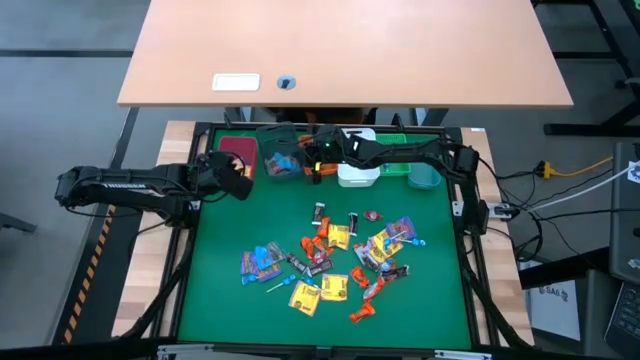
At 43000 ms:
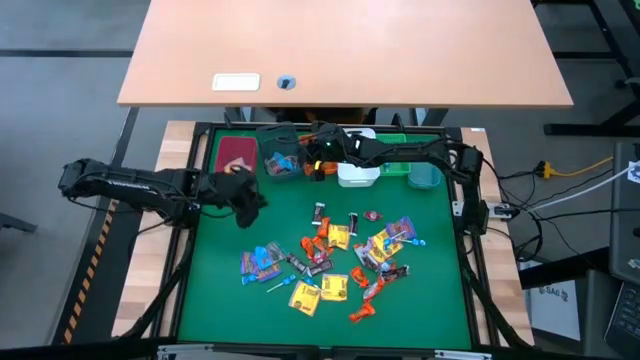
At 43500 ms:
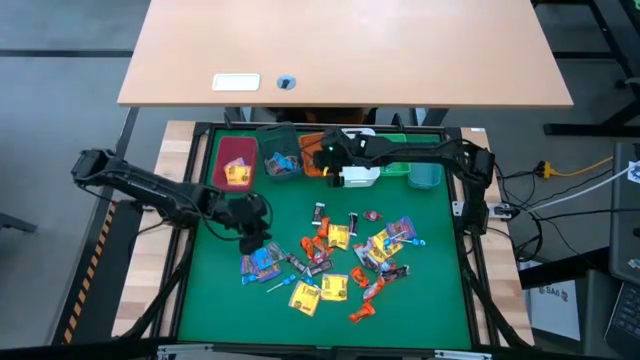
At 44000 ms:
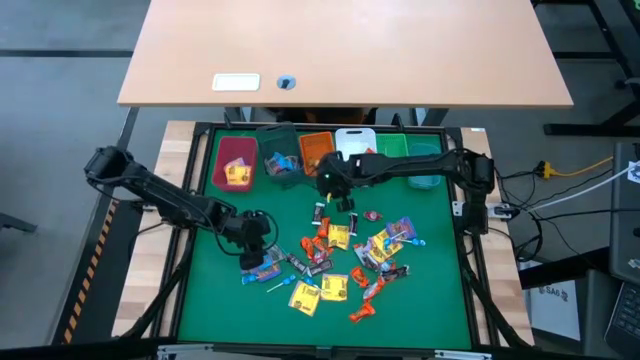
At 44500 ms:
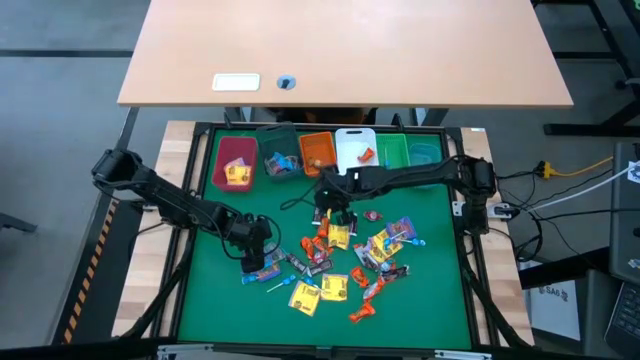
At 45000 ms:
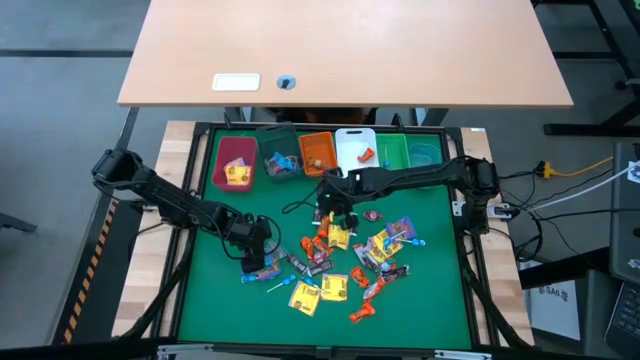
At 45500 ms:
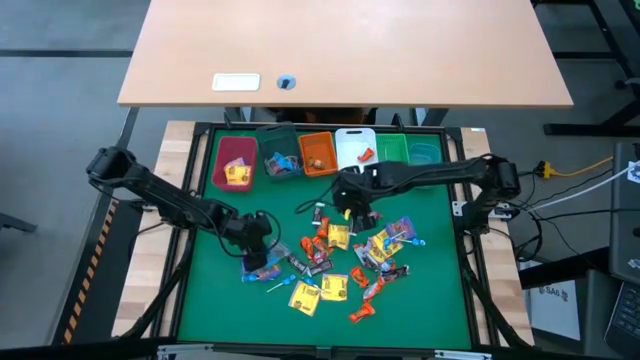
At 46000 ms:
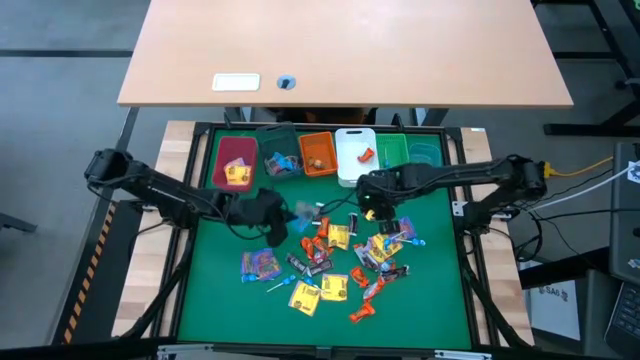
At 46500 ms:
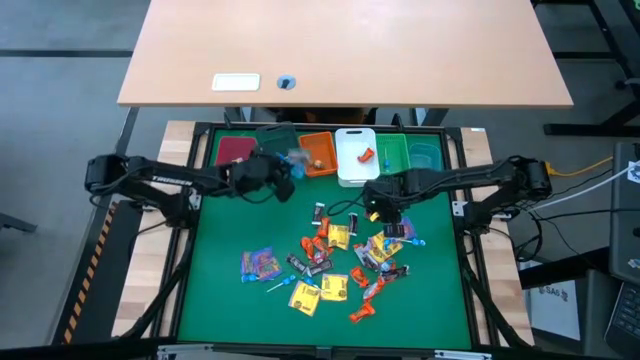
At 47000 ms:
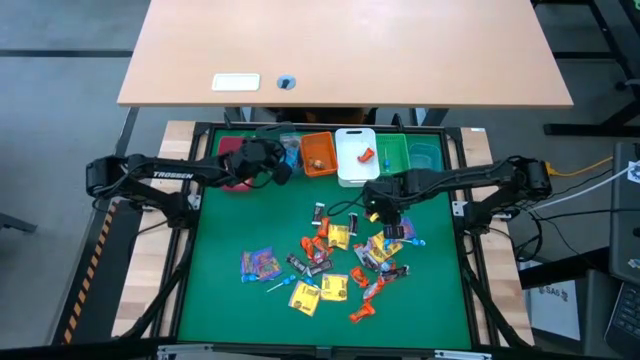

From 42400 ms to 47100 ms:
Task: Sort candy
Put the blue candy into the black bin

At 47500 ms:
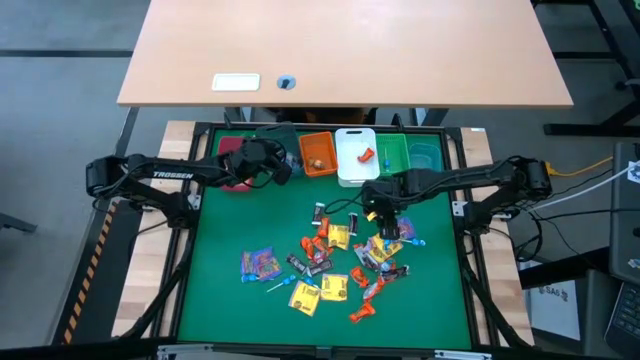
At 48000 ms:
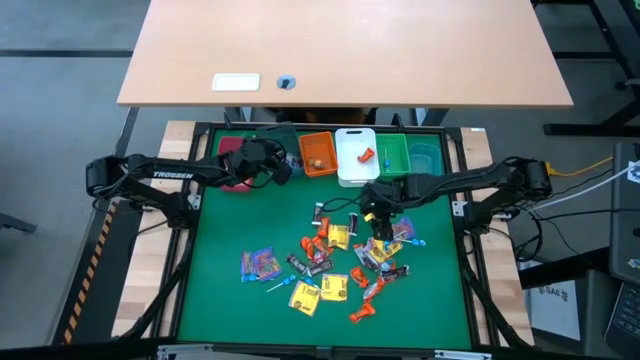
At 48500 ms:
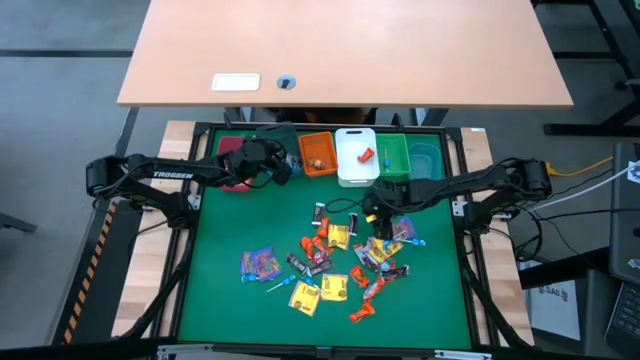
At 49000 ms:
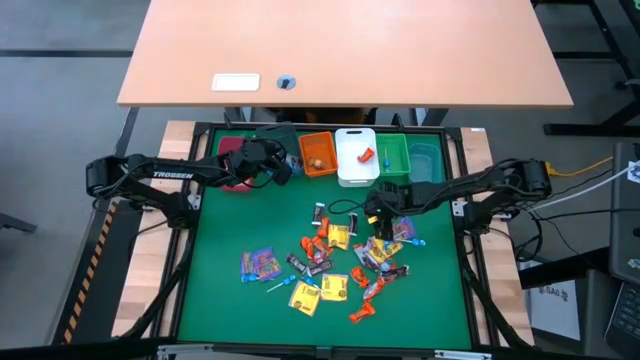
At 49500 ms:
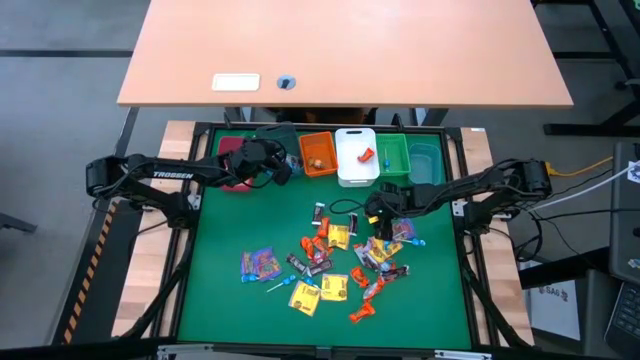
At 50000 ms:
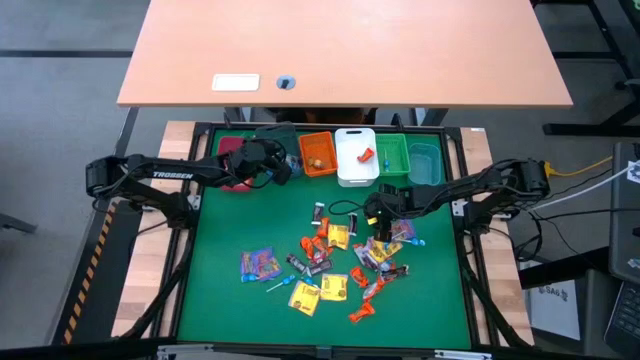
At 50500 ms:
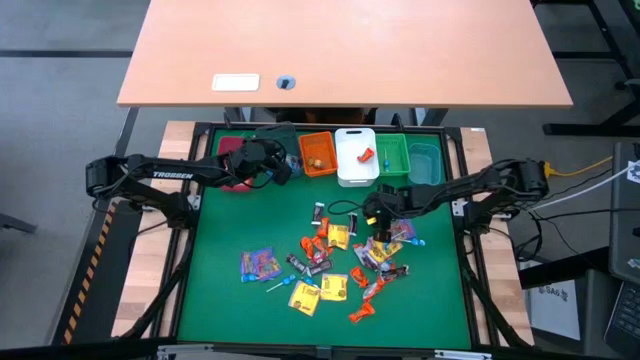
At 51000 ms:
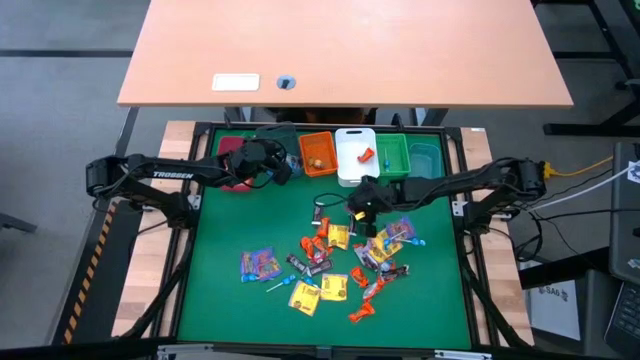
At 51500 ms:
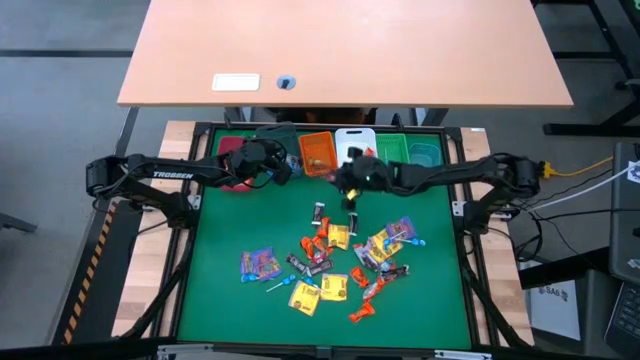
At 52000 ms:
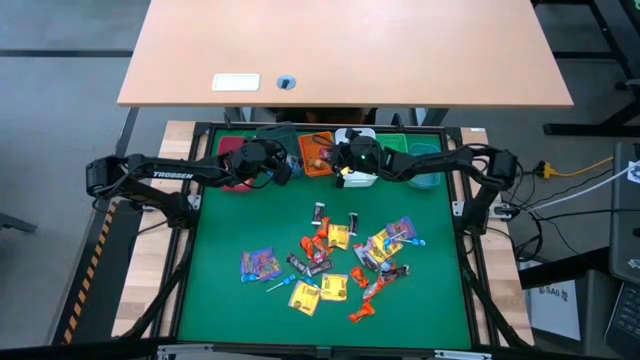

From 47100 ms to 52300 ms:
Put the red chocolate into the orange bin

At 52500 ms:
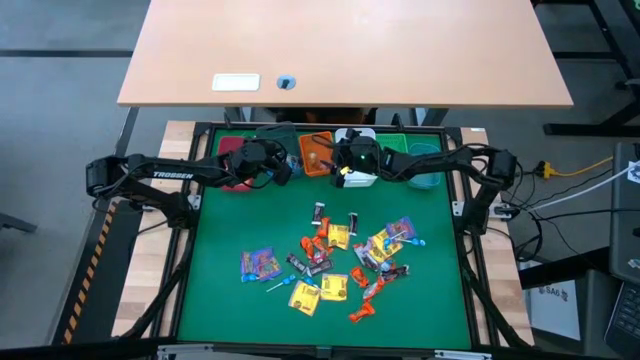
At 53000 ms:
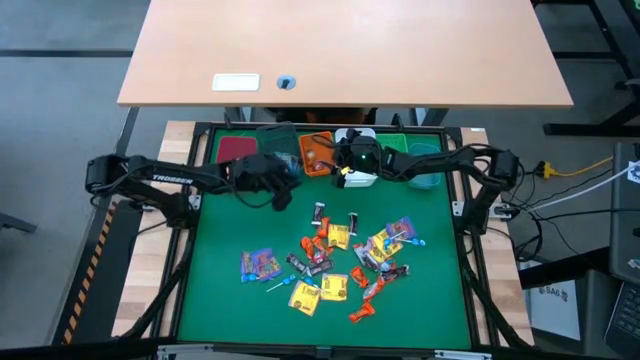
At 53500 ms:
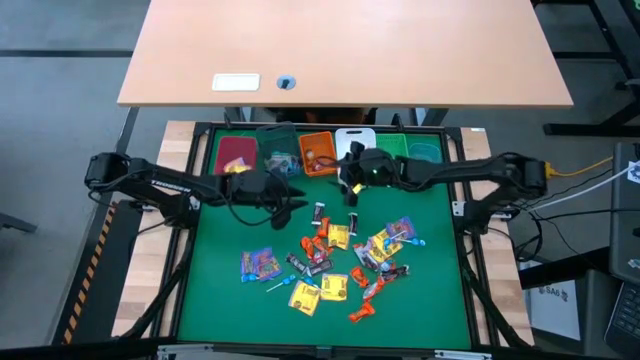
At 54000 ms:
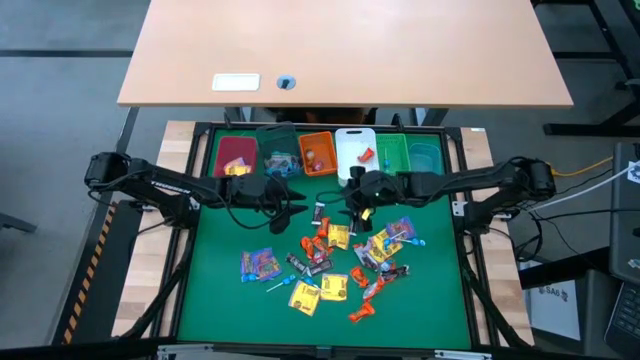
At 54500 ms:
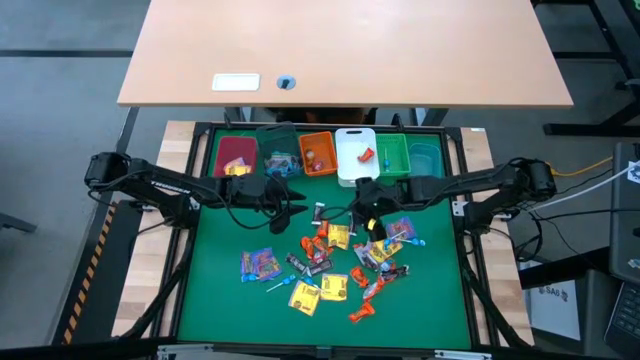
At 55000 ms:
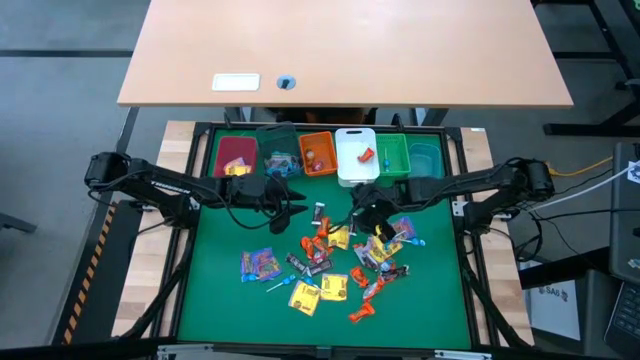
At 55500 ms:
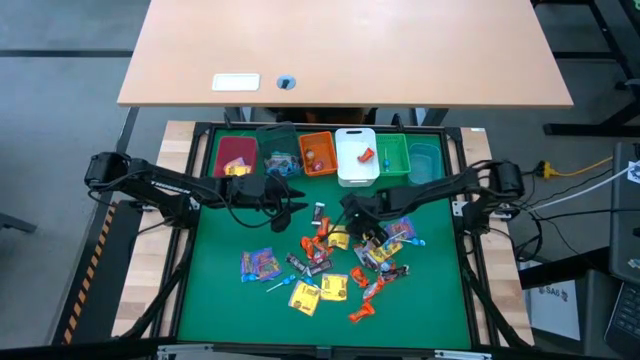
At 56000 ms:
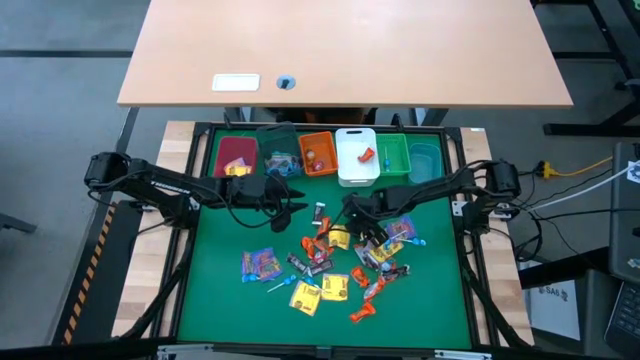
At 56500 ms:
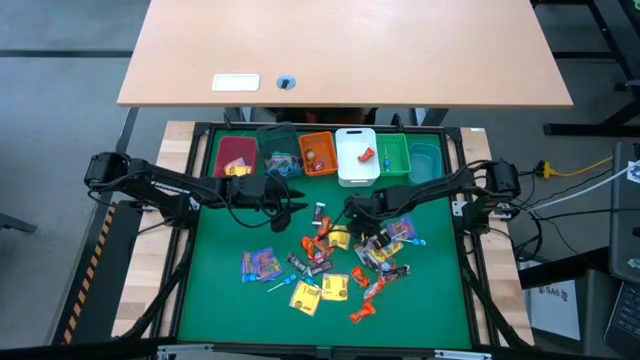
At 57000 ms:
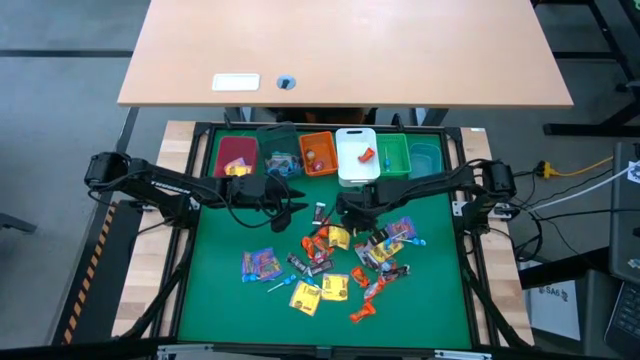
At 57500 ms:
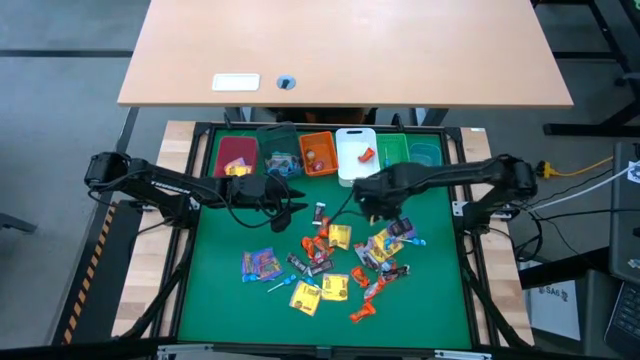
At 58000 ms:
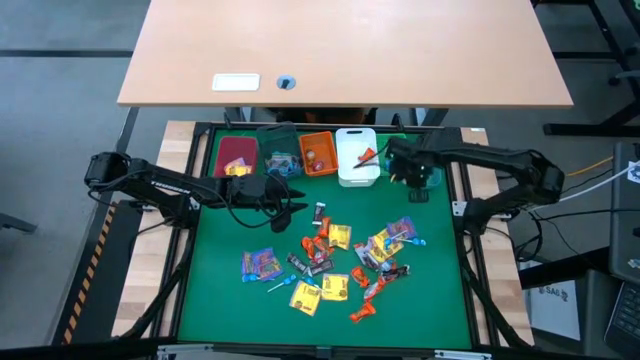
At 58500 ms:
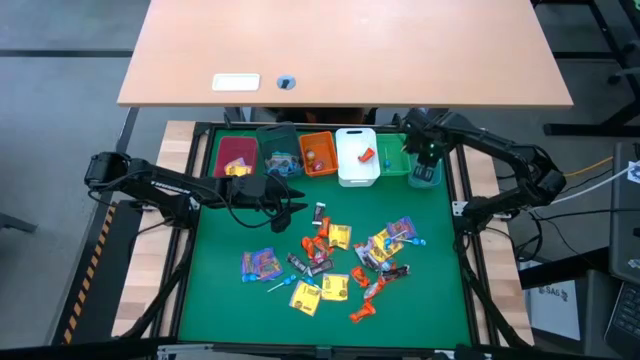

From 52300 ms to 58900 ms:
Put the brown chocolate into the blue bin

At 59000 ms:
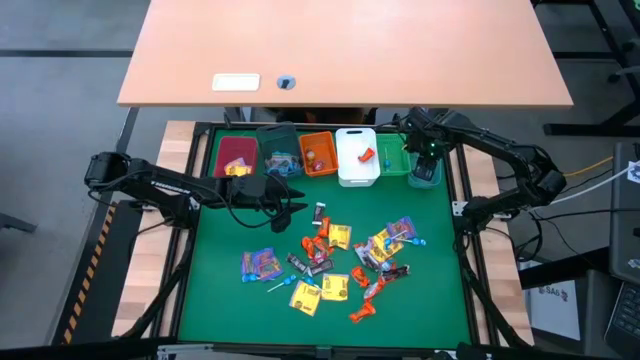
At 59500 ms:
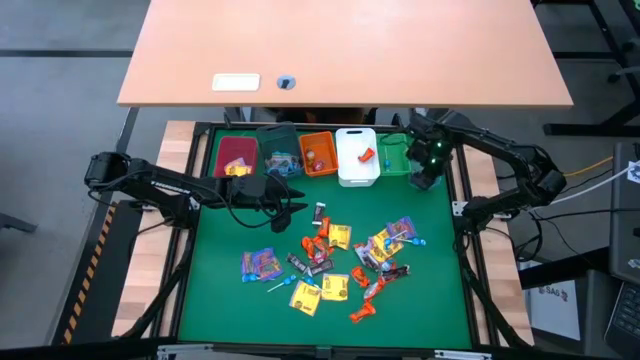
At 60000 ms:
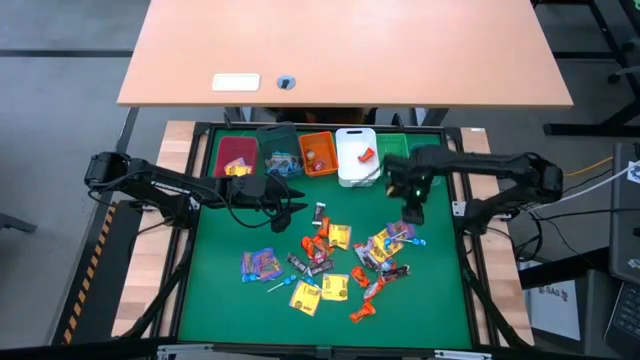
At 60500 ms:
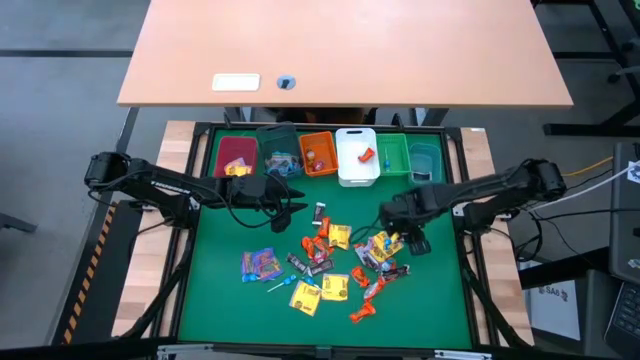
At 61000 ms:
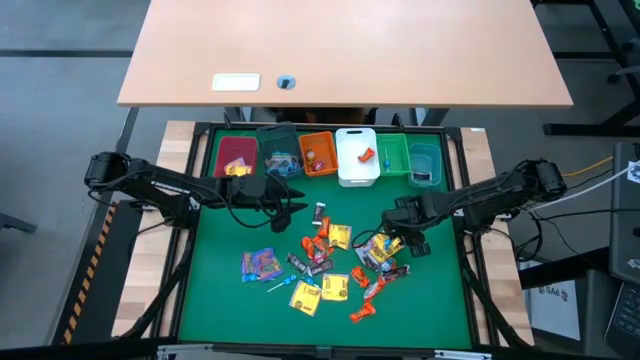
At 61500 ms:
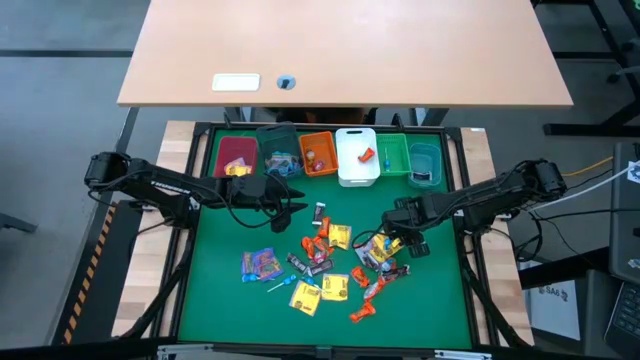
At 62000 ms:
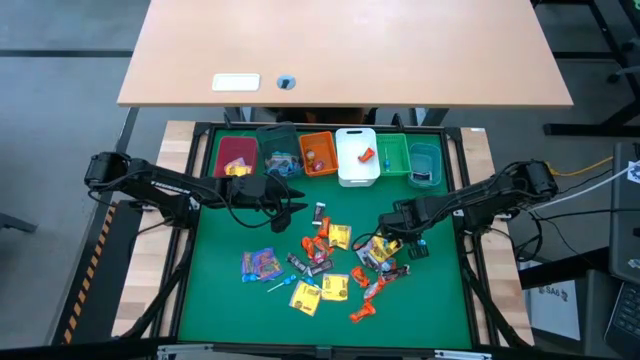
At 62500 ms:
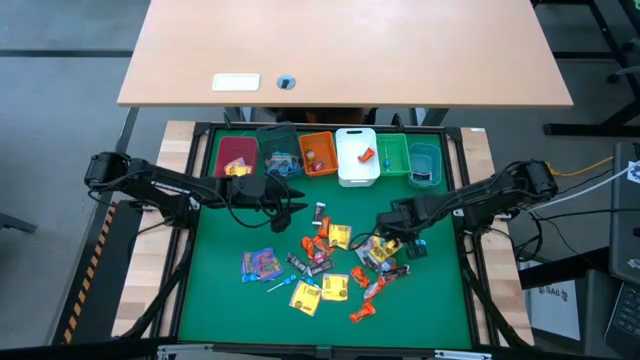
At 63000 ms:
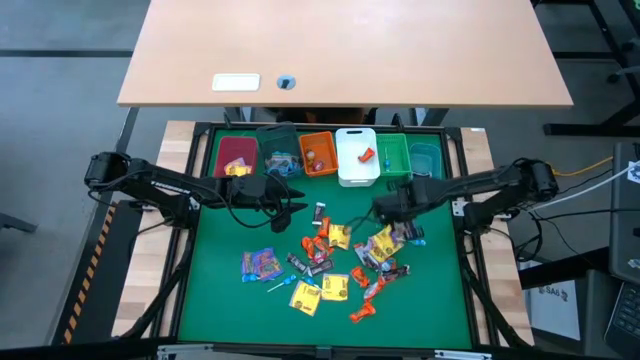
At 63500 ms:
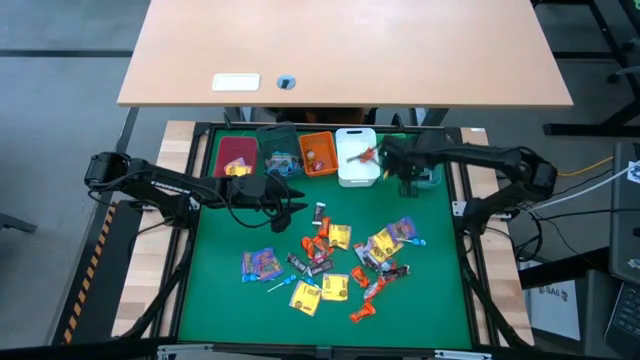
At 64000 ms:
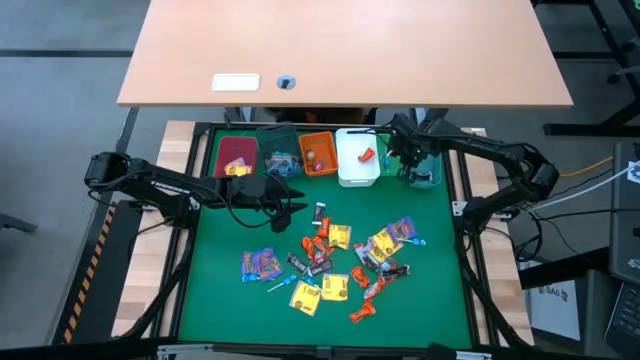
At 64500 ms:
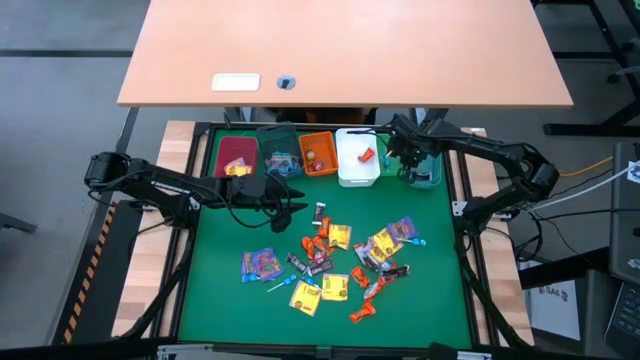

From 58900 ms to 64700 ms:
Put the blue lollipop into the green bin
